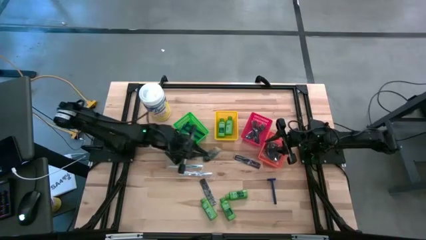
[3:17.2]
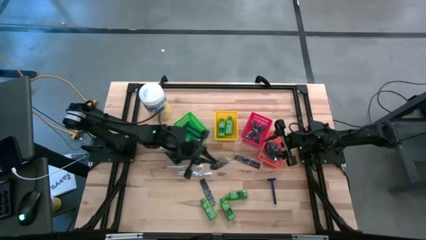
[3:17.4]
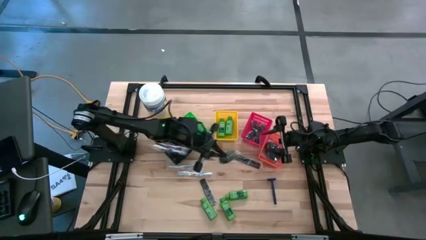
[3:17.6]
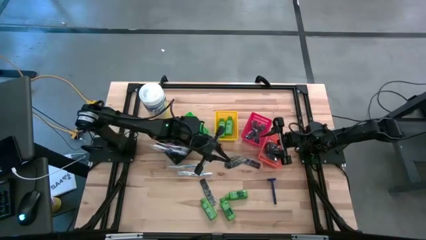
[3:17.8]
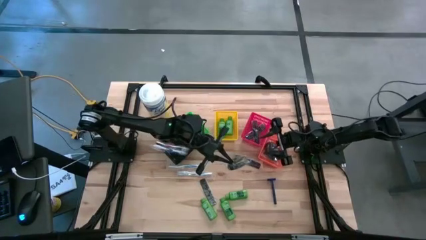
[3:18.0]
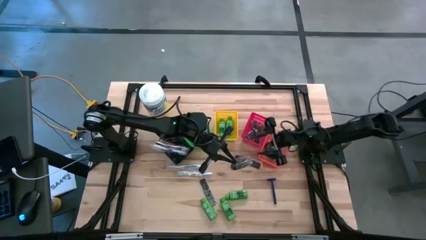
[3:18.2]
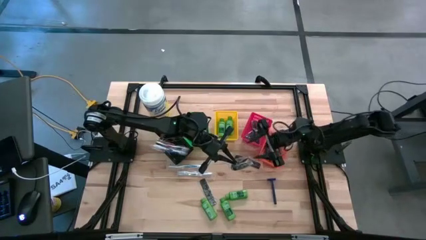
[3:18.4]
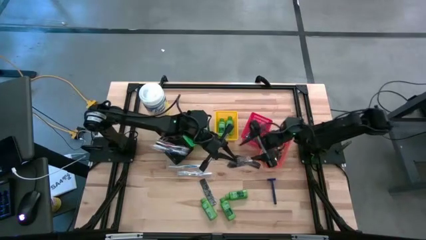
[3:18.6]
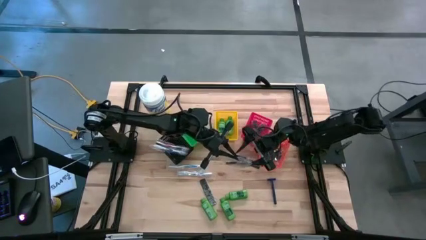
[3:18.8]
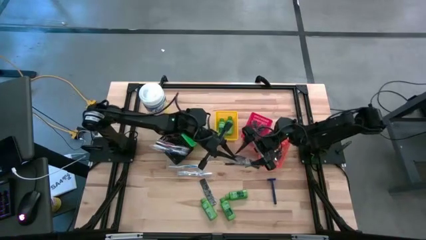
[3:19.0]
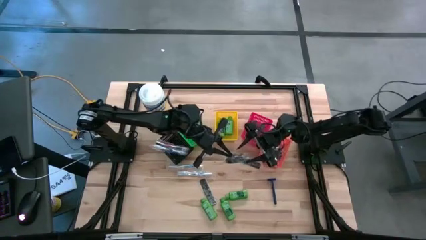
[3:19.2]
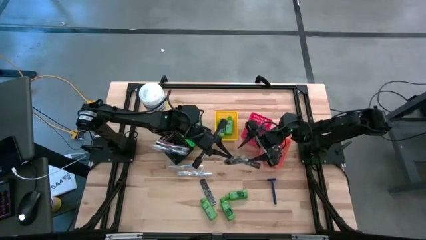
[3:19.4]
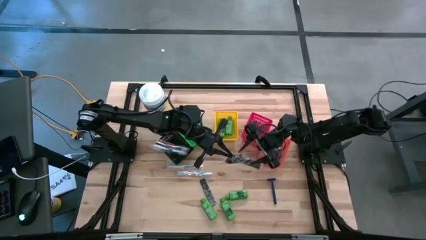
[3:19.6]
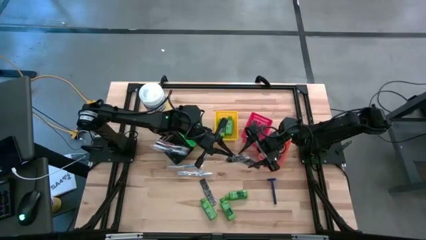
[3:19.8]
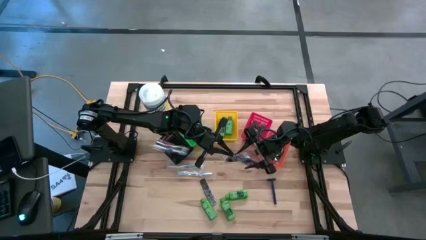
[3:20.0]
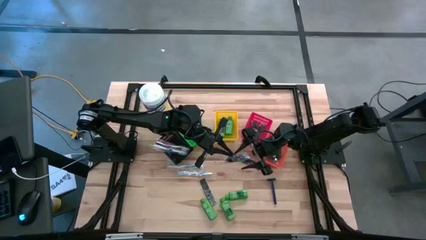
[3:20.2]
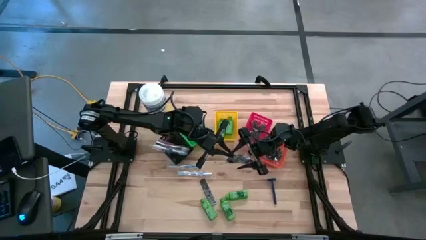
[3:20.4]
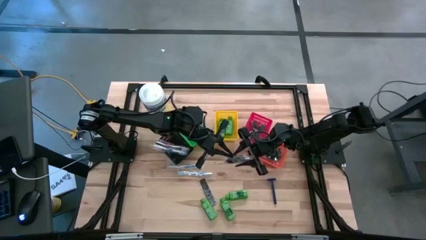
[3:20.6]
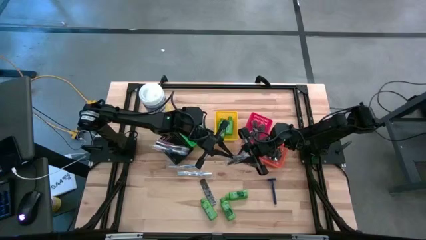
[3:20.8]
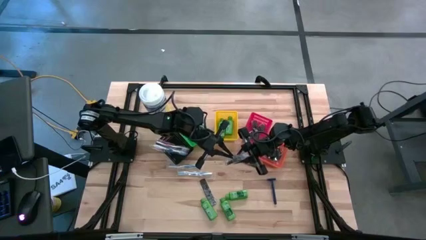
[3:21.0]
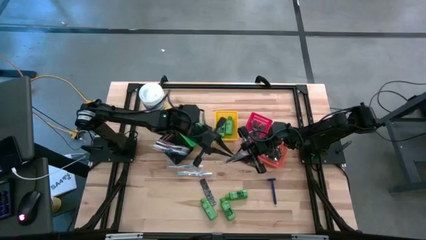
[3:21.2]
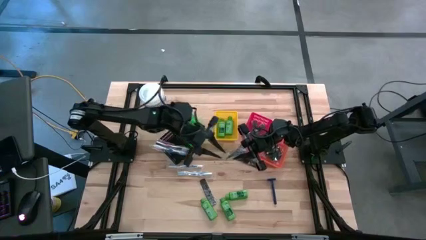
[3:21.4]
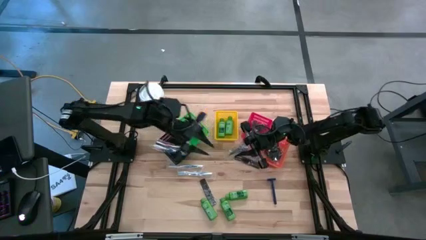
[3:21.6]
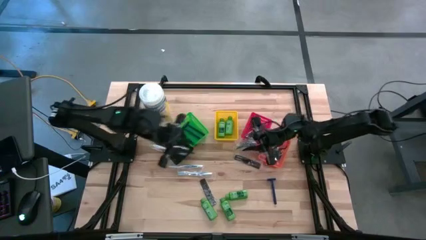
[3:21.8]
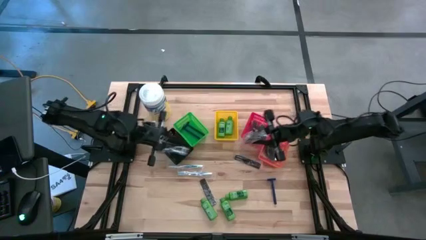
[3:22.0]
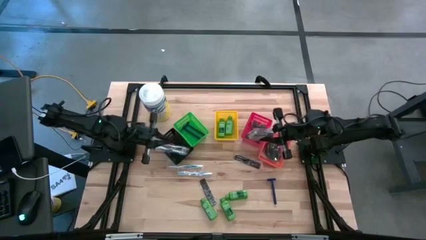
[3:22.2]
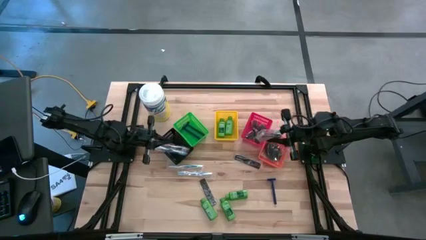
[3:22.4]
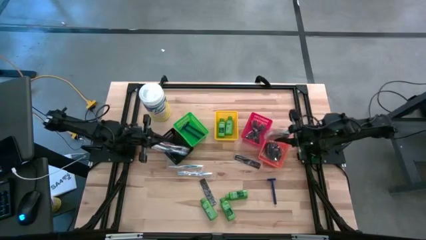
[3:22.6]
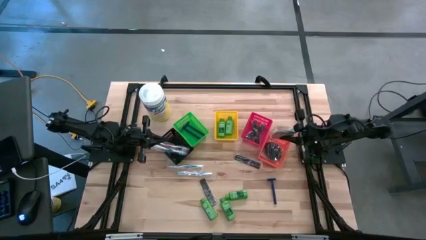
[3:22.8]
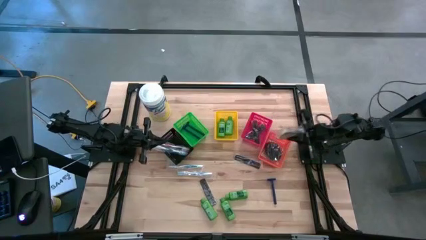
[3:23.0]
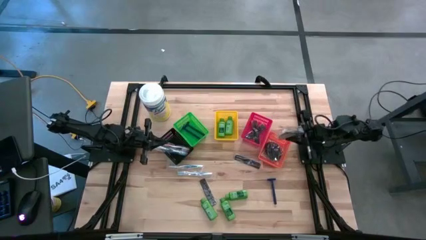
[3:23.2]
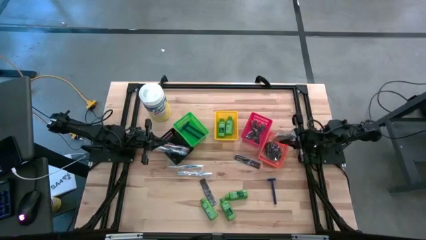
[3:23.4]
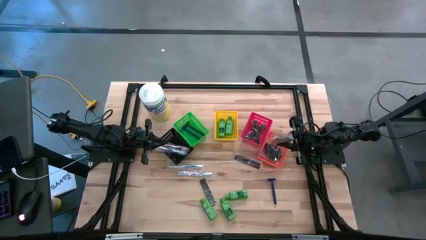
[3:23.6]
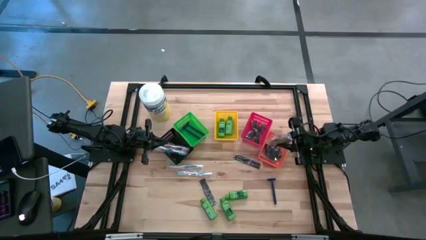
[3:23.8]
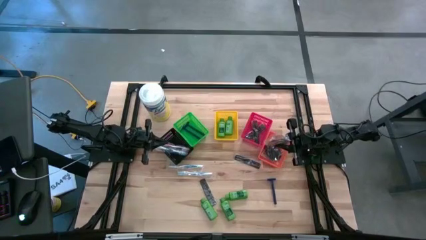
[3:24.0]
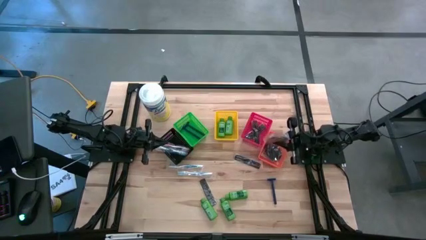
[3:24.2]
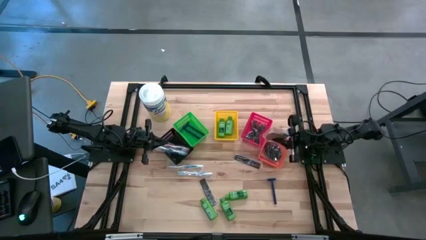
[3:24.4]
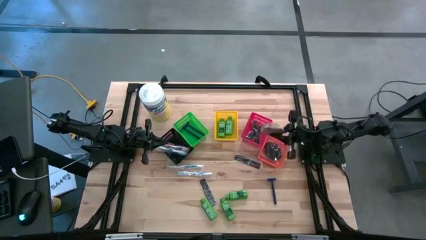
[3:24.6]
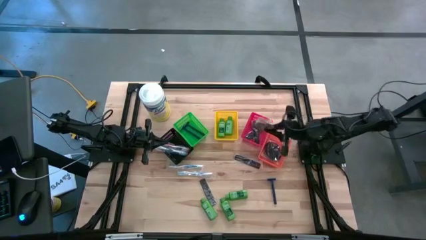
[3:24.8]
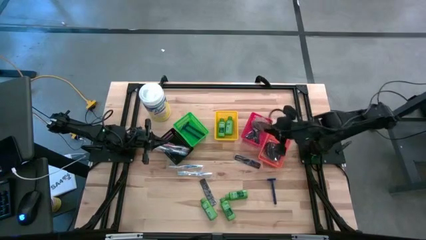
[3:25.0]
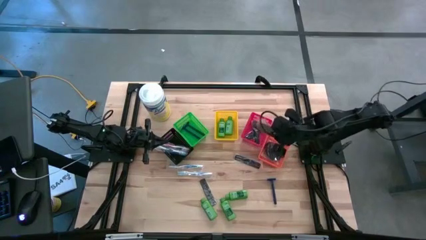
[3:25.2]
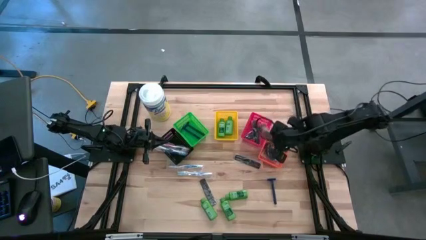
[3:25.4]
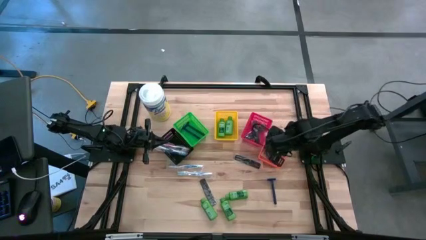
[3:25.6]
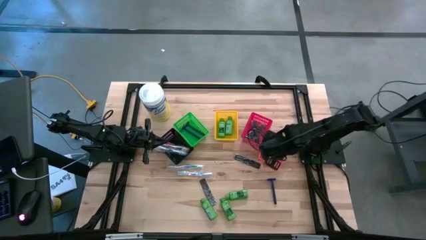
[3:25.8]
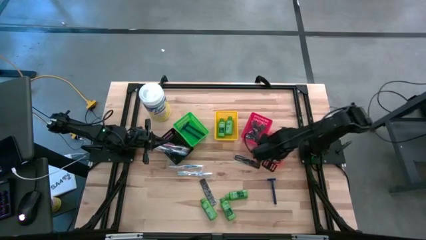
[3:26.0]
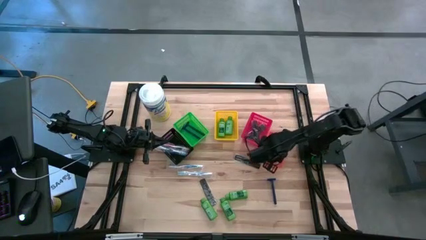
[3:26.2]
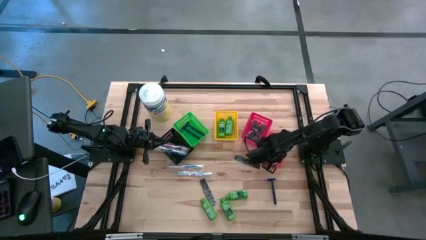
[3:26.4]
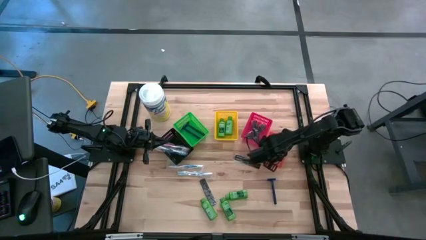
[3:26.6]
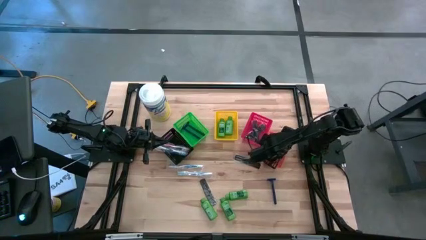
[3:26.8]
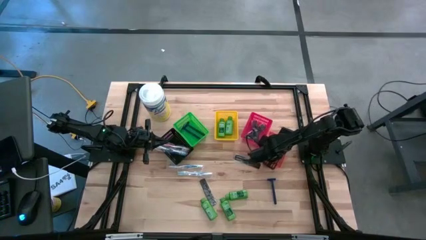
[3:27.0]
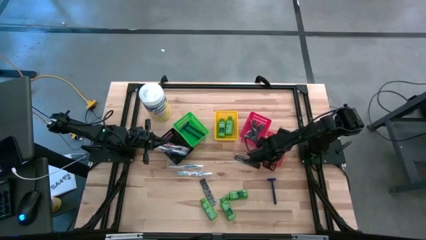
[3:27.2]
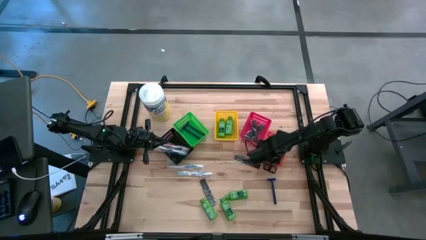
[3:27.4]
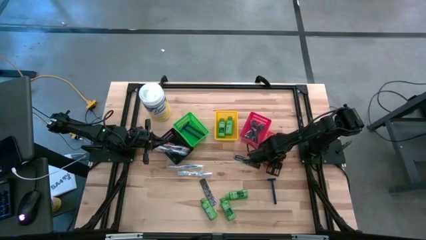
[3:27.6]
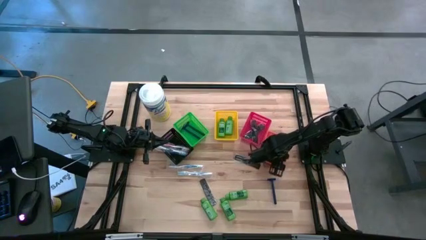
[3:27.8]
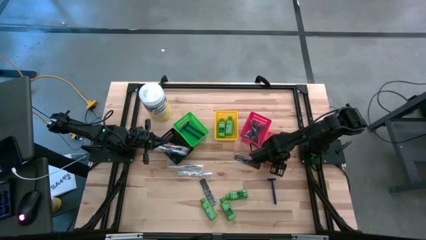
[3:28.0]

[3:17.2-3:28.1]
Task: Pick & Place Travel size toiletries
Put the black hair brush into the red bin

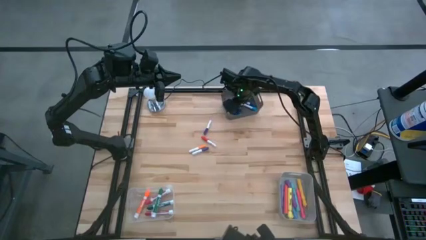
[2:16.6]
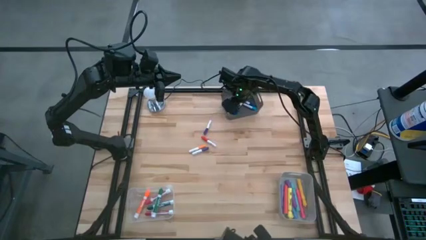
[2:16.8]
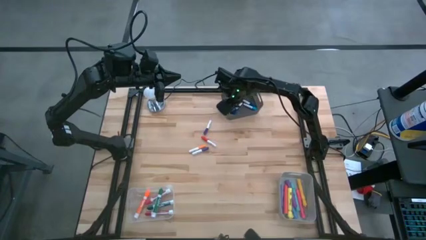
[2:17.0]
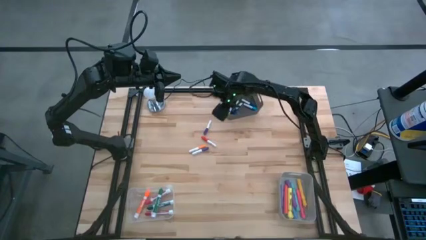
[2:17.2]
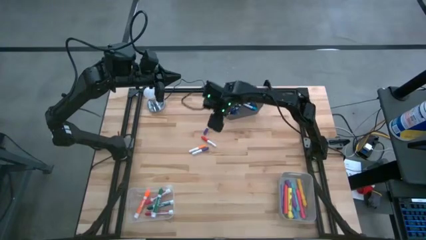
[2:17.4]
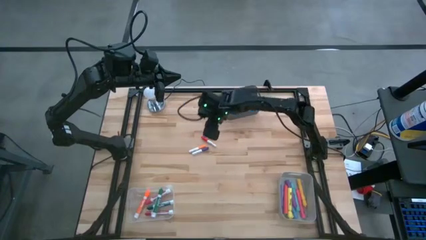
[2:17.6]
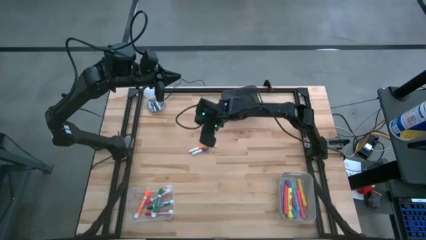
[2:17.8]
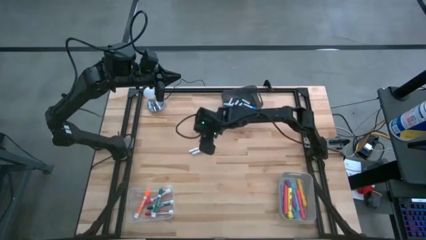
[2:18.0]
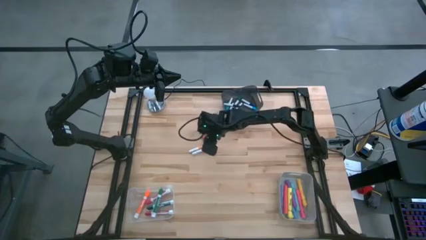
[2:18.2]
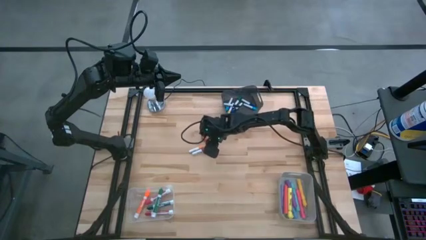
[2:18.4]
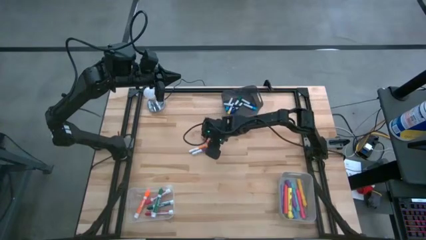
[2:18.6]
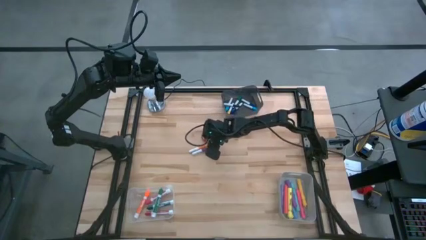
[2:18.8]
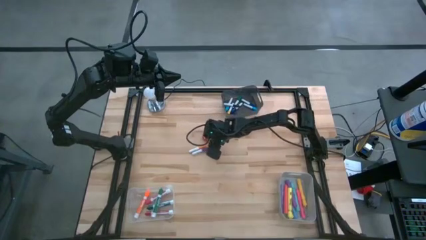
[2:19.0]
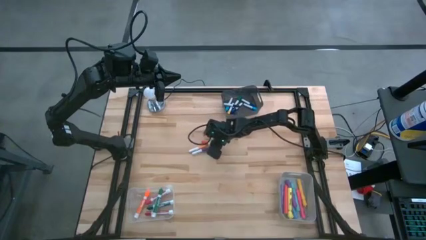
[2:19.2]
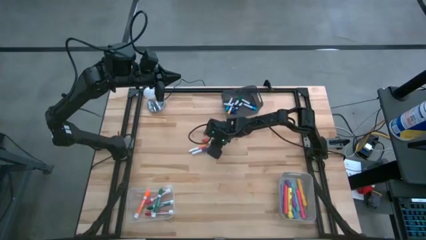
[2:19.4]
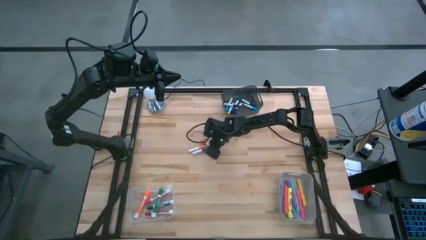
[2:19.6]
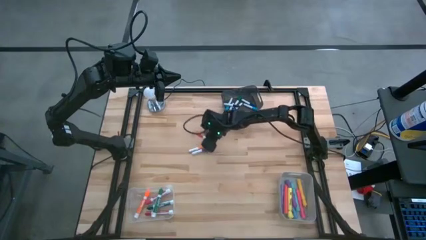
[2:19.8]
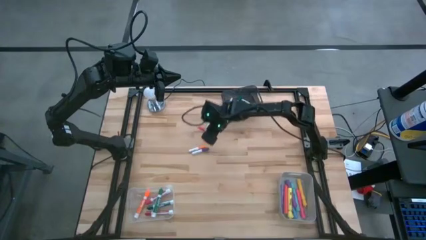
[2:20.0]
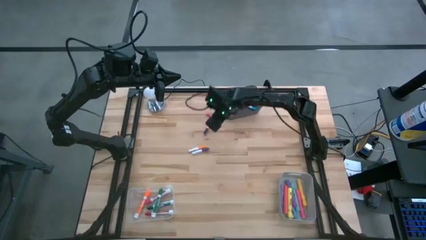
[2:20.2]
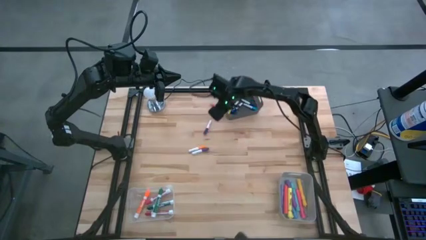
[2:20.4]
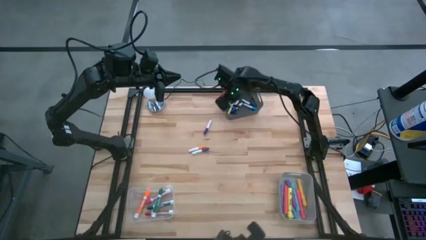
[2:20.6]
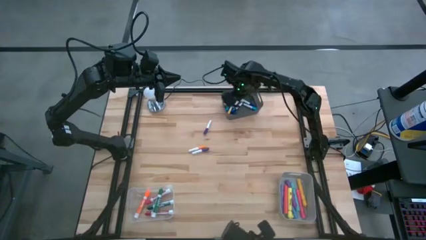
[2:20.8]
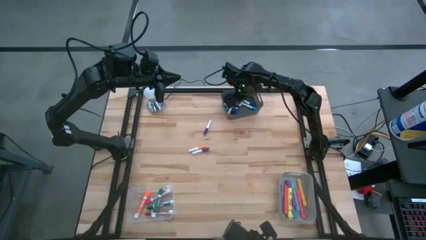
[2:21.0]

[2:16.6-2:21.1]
Task: Pick & Place Markers
Put the small red highlighter pen into the black bin
